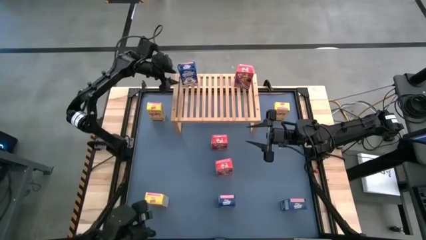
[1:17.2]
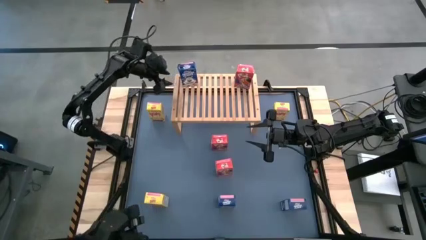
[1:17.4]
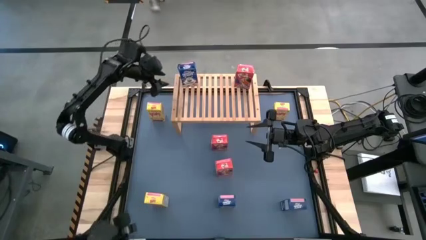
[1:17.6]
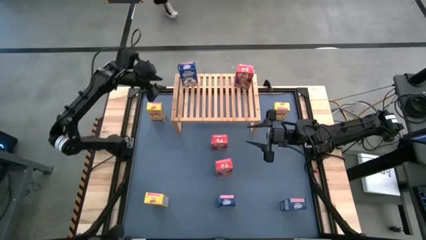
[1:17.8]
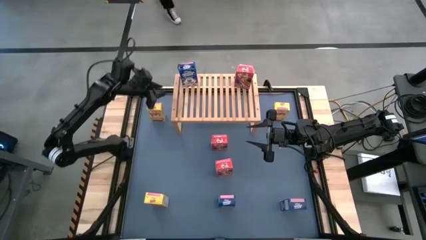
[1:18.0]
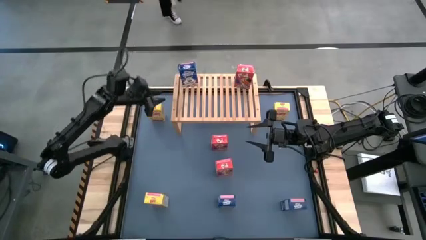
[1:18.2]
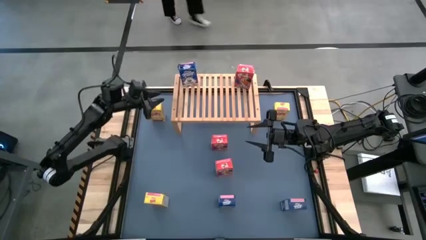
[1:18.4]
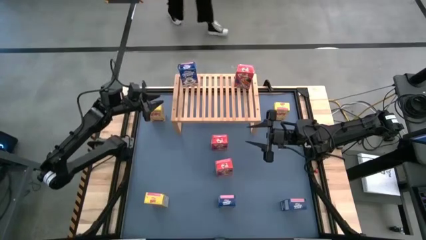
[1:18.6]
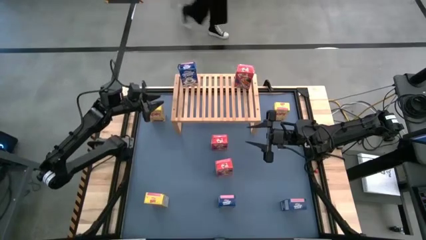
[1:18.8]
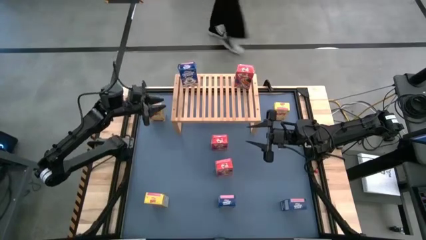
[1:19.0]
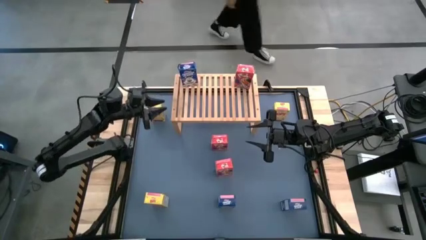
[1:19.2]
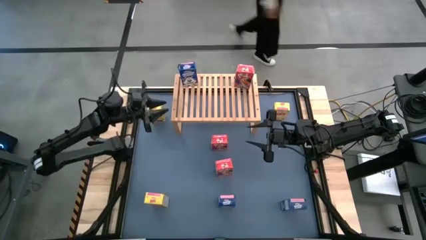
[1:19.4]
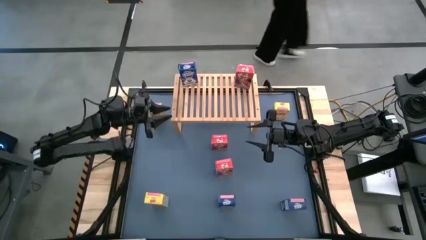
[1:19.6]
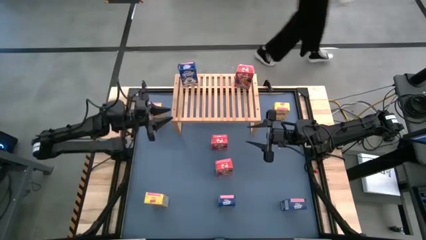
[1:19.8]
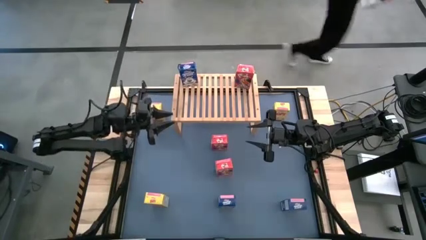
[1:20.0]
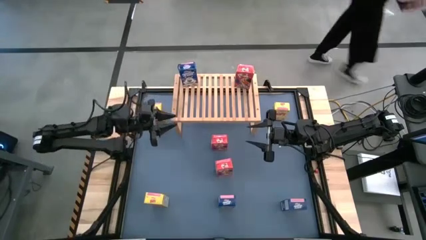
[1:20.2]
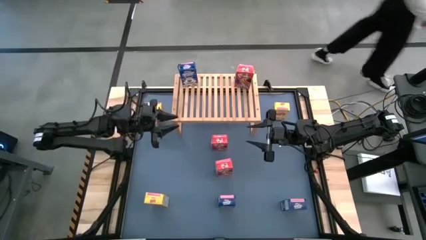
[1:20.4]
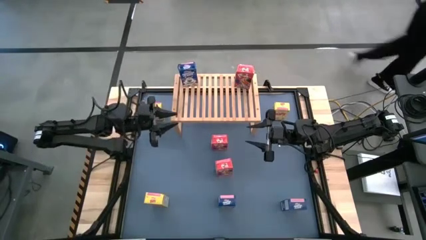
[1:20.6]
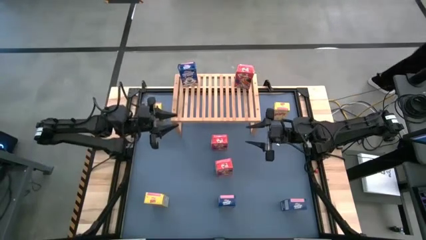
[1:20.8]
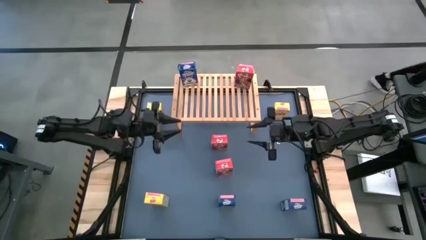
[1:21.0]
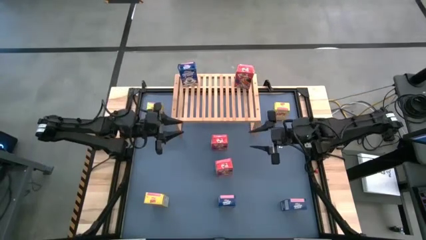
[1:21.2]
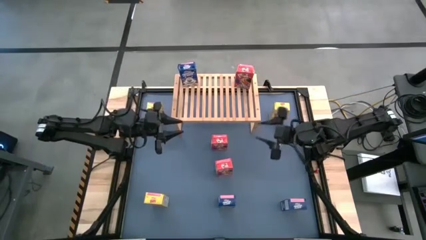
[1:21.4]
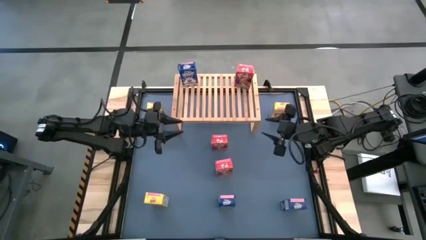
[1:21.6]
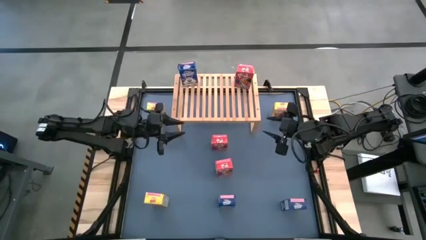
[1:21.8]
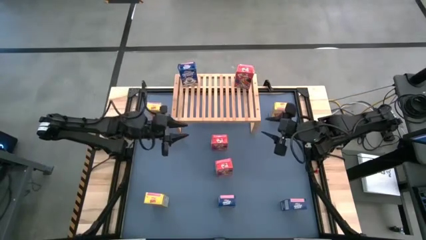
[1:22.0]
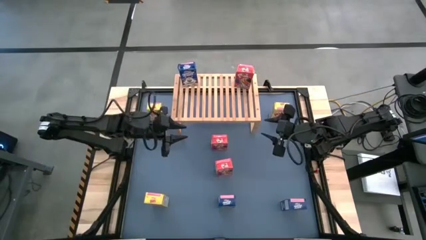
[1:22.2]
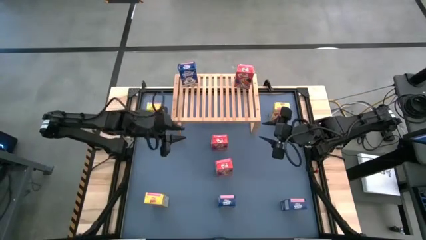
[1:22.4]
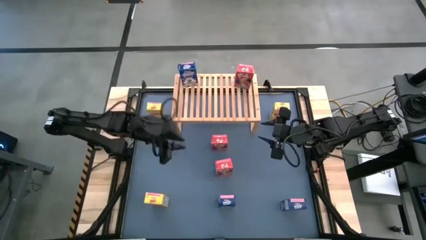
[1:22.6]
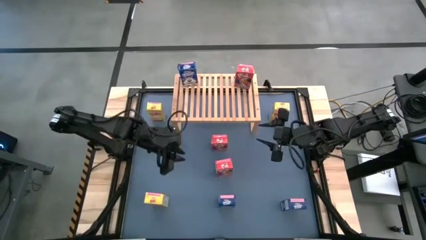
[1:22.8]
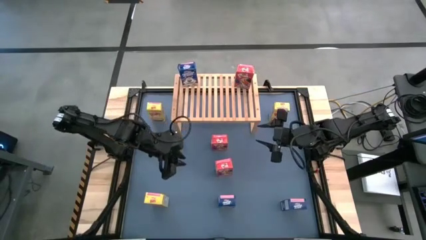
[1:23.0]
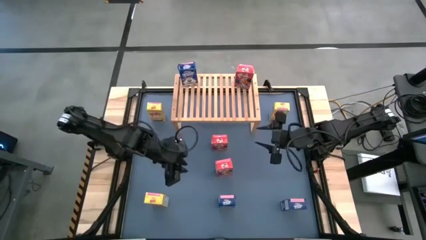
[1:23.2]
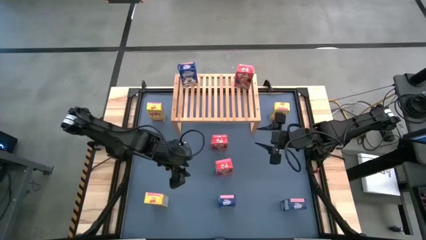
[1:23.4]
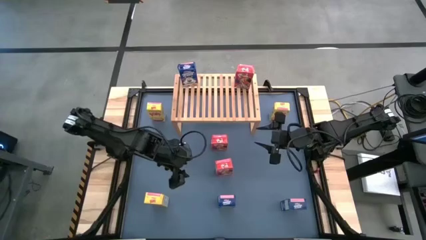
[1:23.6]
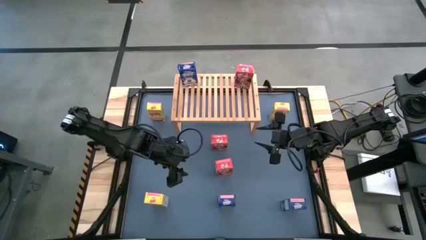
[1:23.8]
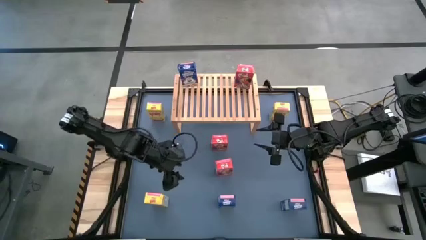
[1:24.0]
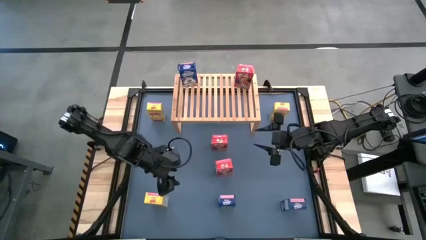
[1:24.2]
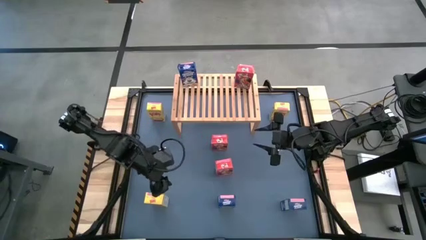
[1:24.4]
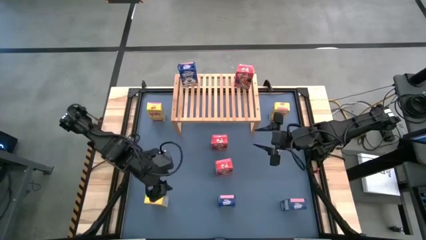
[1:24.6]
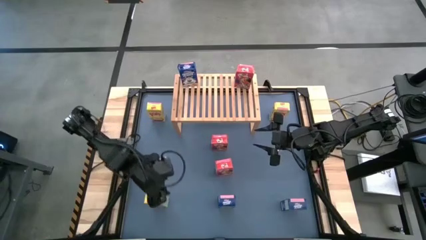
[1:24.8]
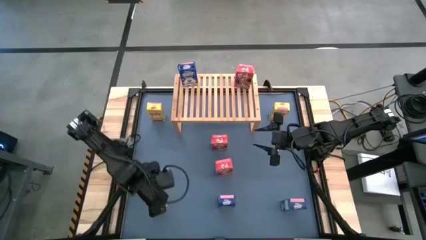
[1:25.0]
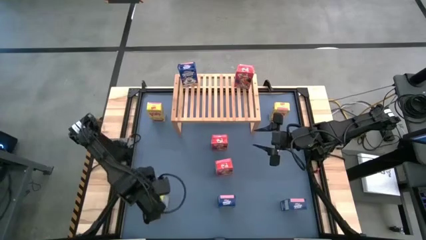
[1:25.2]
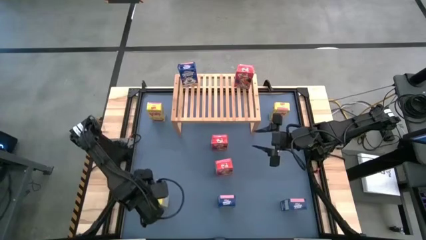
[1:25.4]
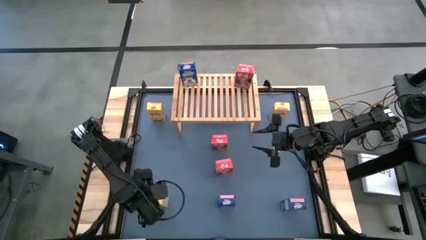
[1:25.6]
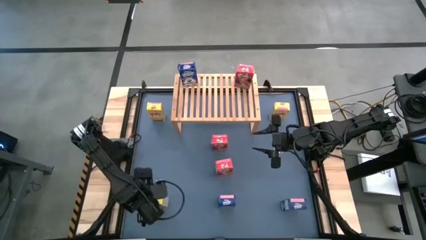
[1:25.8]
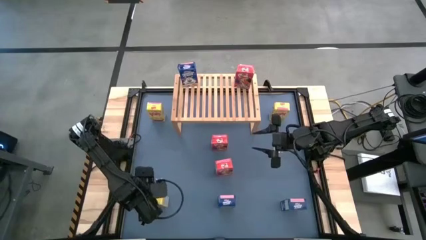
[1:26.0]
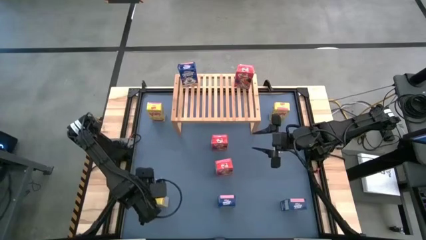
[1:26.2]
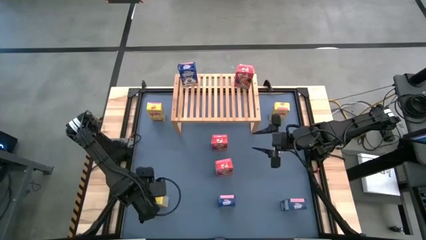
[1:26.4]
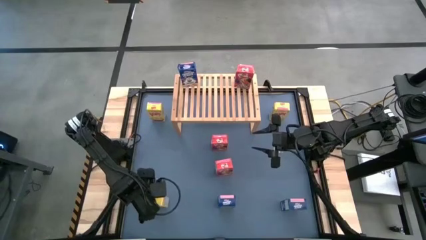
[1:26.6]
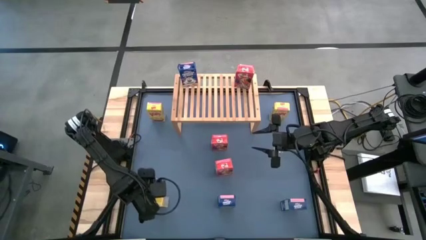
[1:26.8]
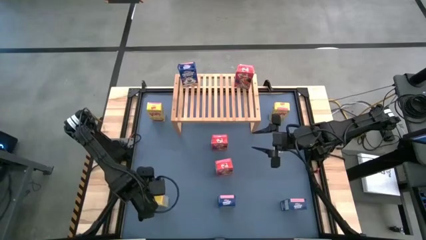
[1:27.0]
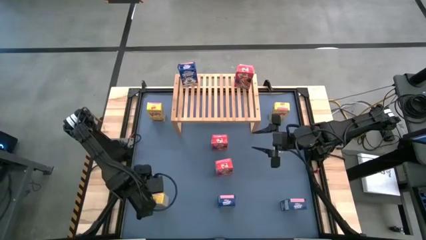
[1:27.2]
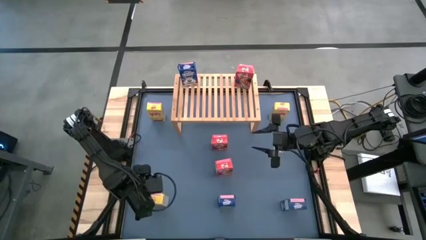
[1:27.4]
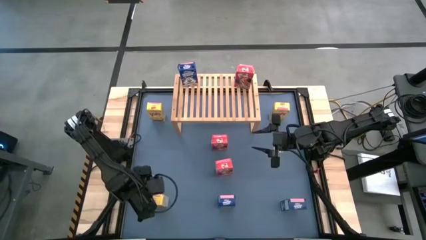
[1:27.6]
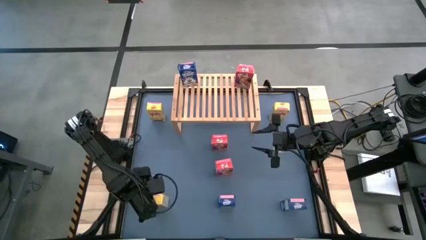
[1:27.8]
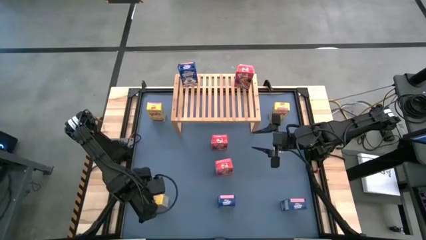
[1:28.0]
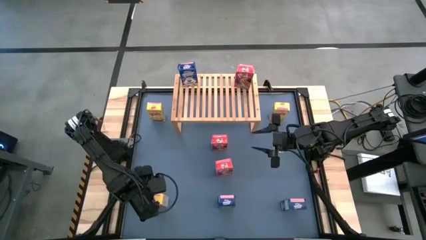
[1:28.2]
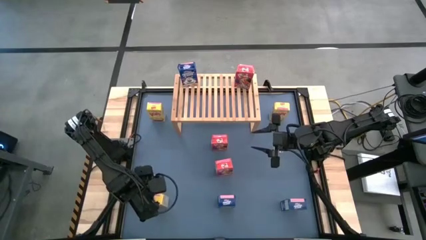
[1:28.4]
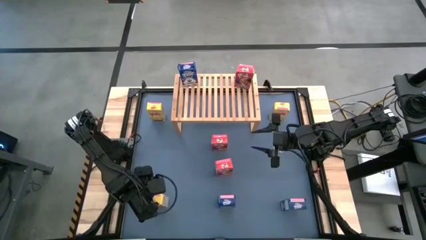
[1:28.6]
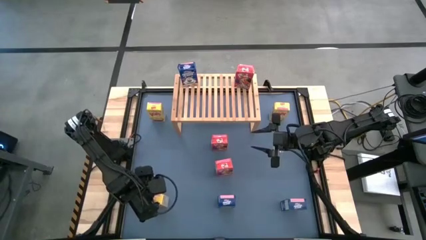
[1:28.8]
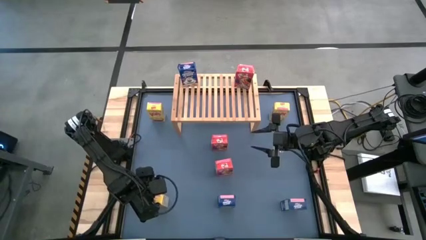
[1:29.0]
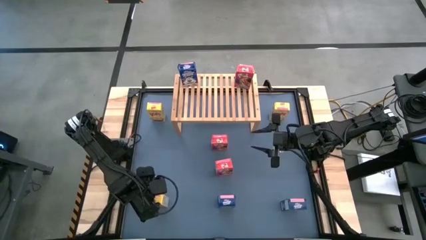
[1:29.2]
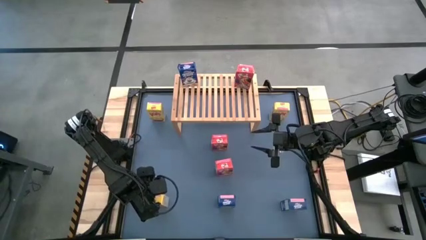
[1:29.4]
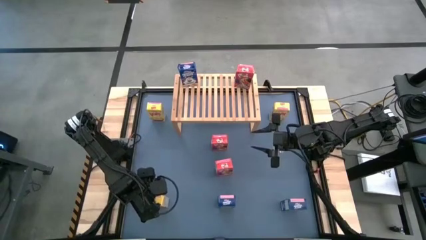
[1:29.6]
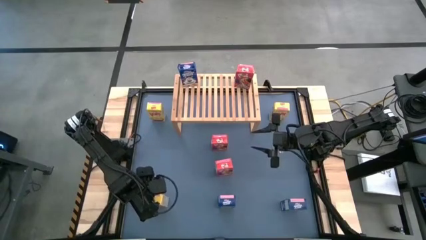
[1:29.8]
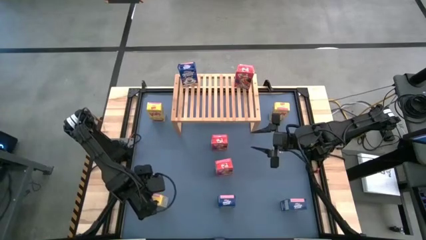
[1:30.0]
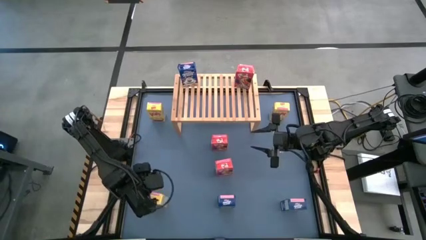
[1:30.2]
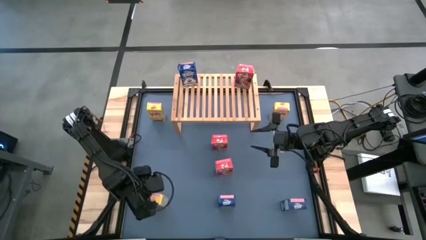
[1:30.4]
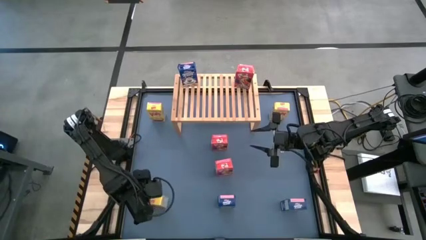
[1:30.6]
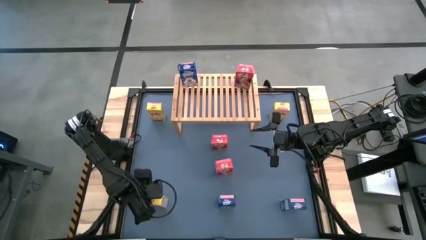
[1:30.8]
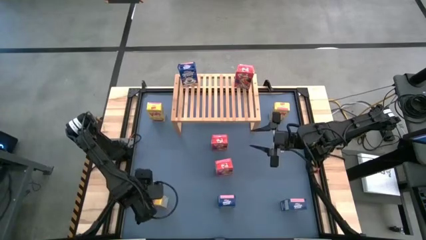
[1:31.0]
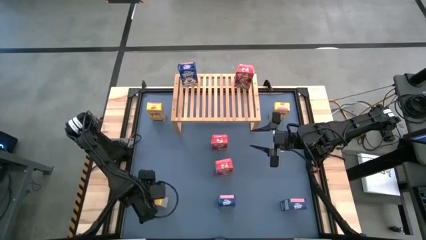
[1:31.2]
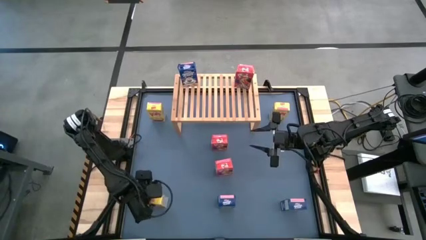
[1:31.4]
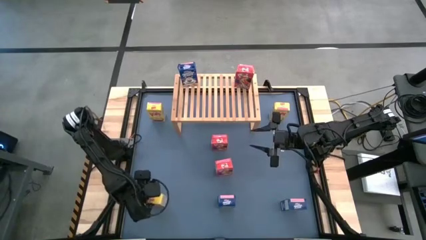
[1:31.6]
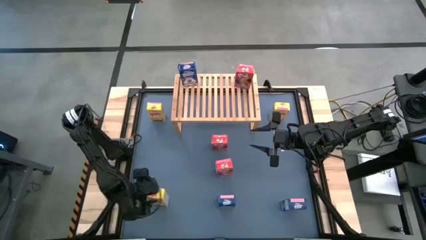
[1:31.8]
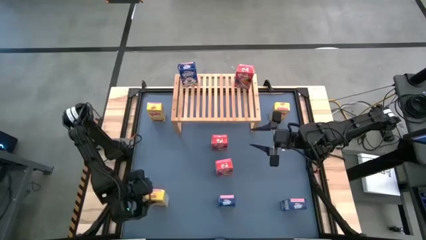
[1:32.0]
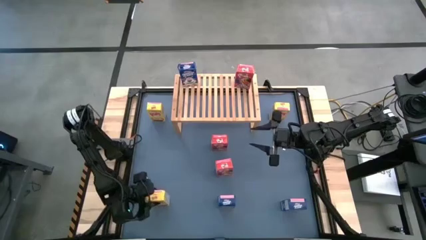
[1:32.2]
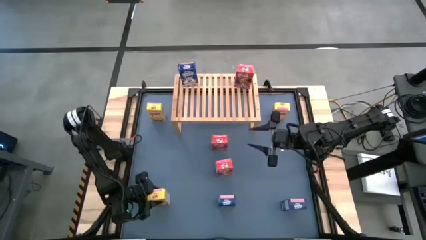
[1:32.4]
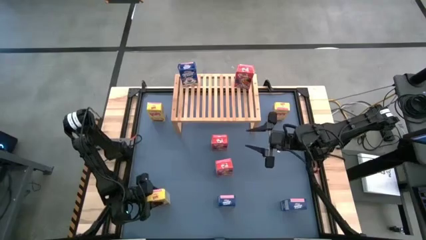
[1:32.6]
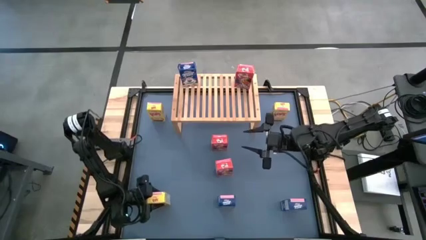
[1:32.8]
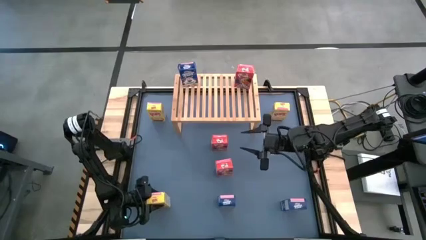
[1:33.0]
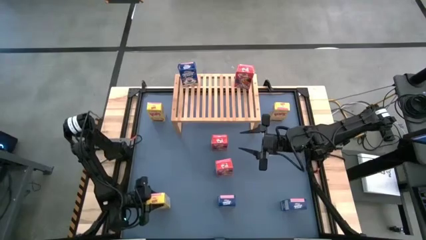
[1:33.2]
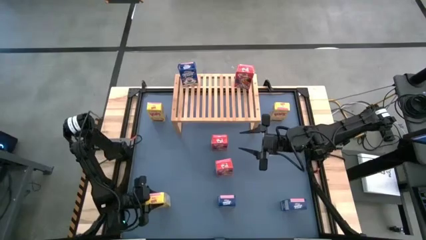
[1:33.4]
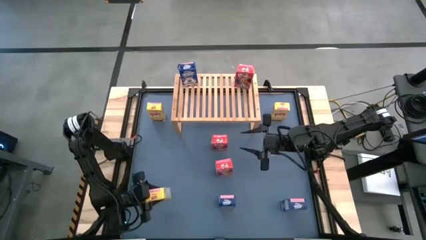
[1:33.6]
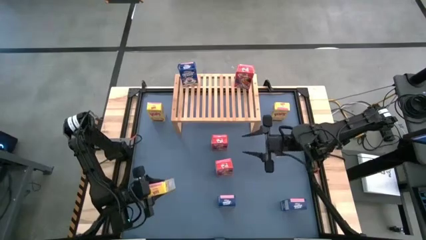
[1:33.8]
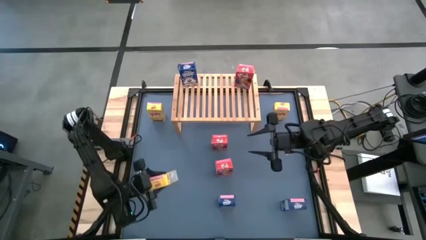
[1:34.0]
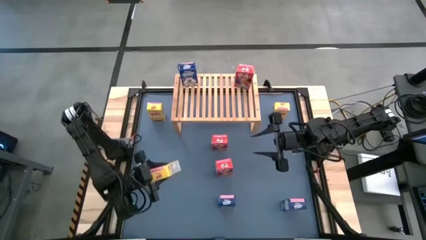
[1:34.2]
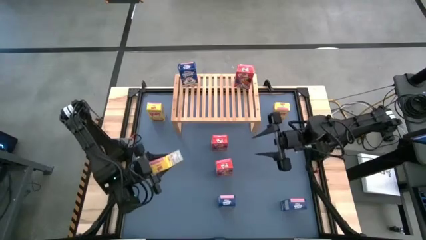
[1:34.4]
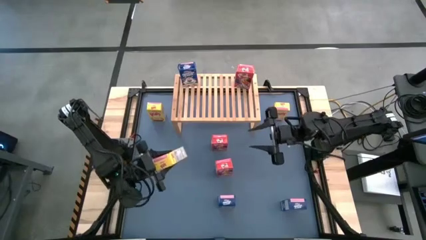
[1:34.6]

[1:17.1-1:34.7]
Task: Stack cereal on shelf
Put the bottom yellow cereal box on the shelf
